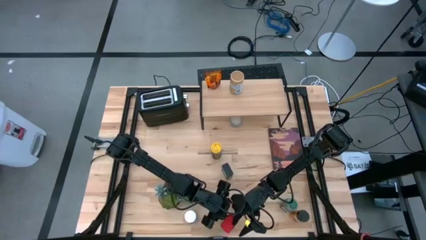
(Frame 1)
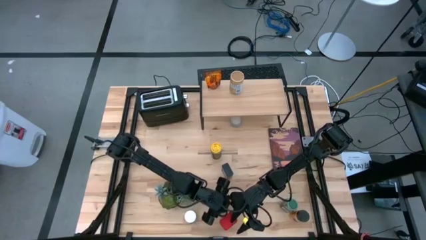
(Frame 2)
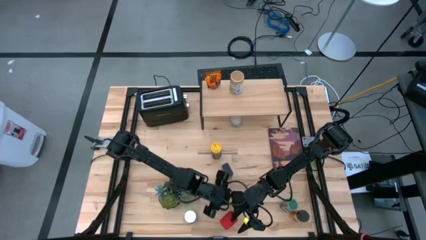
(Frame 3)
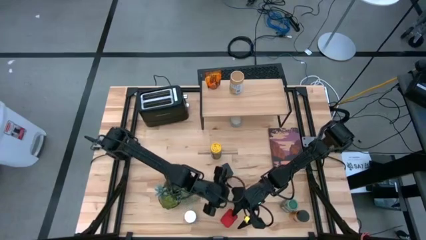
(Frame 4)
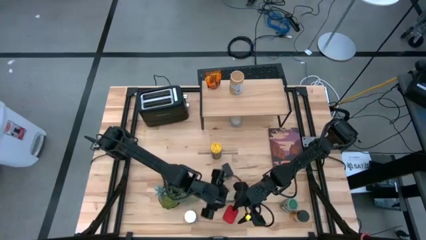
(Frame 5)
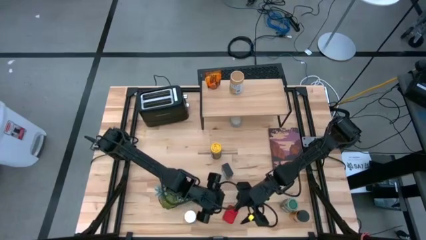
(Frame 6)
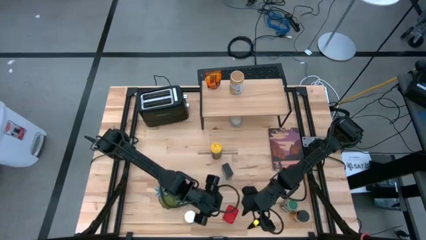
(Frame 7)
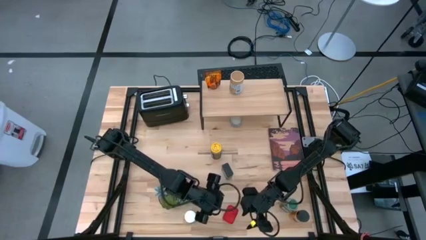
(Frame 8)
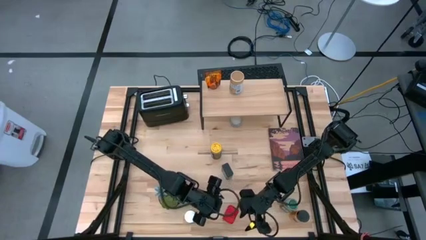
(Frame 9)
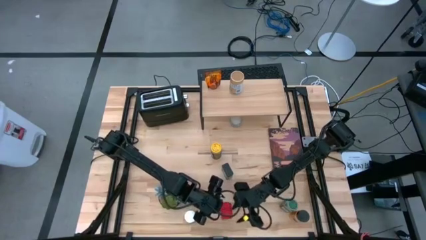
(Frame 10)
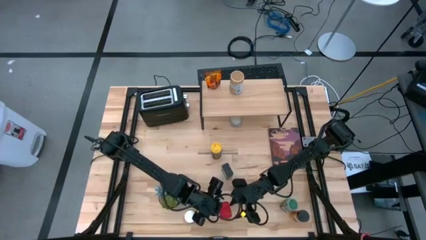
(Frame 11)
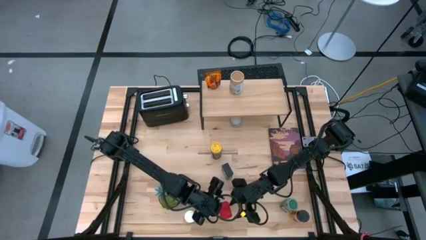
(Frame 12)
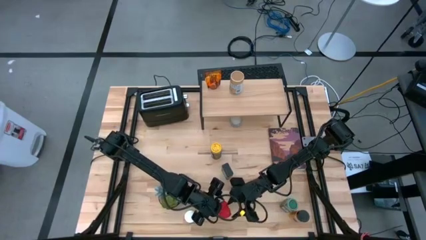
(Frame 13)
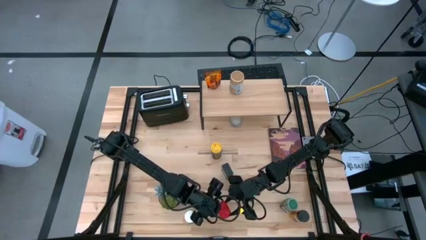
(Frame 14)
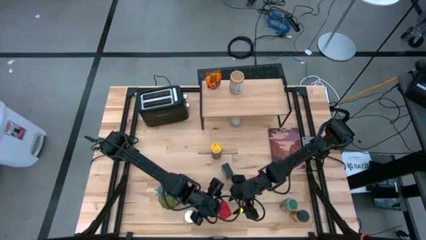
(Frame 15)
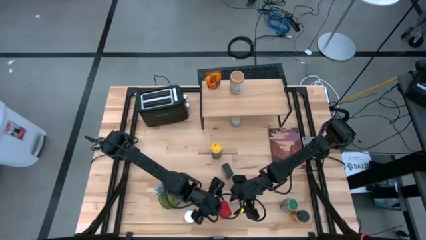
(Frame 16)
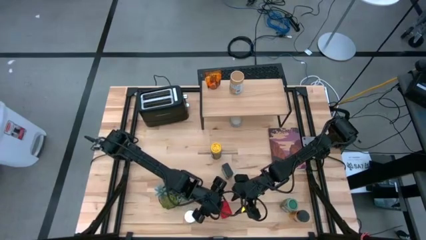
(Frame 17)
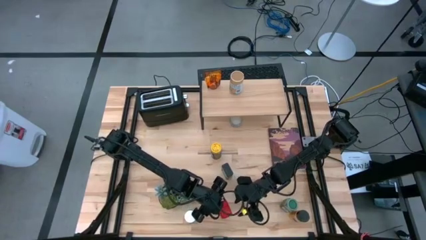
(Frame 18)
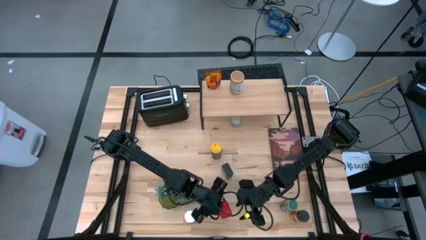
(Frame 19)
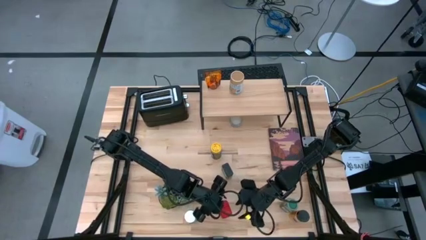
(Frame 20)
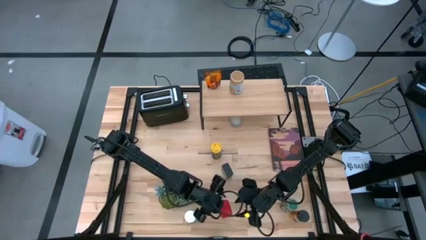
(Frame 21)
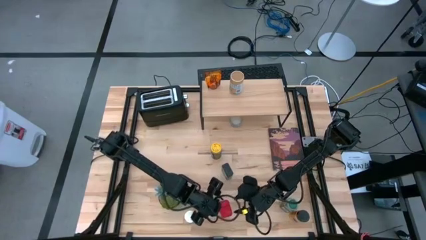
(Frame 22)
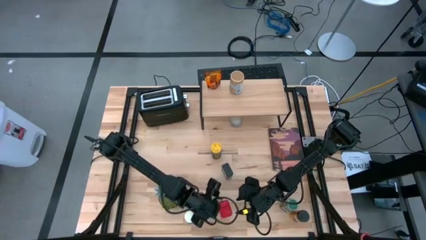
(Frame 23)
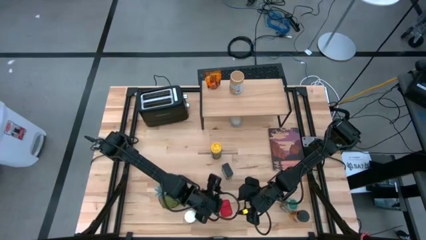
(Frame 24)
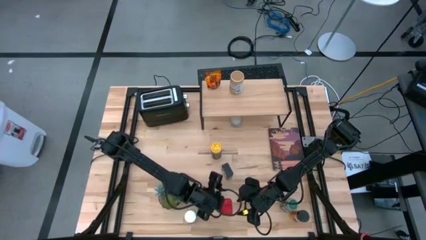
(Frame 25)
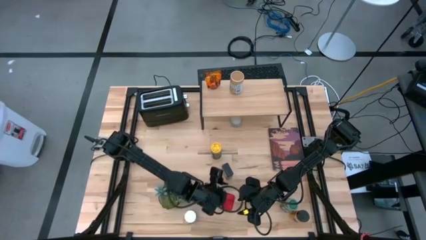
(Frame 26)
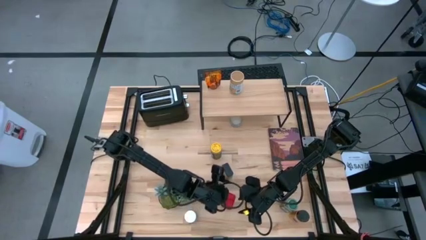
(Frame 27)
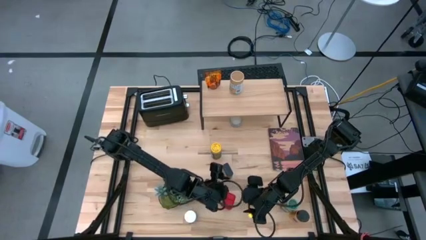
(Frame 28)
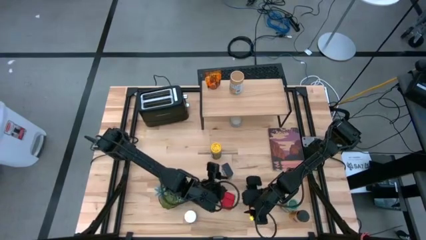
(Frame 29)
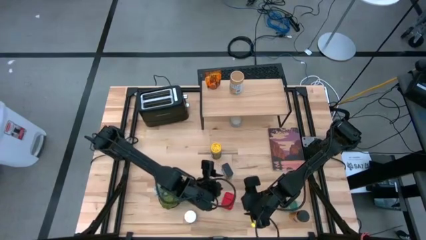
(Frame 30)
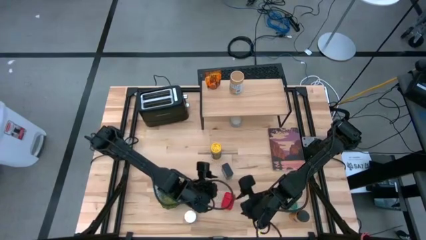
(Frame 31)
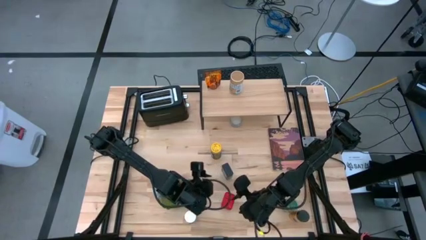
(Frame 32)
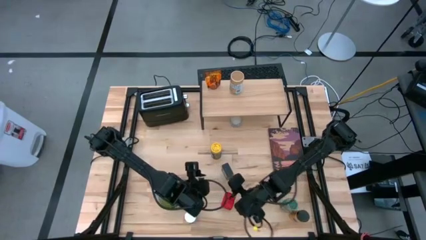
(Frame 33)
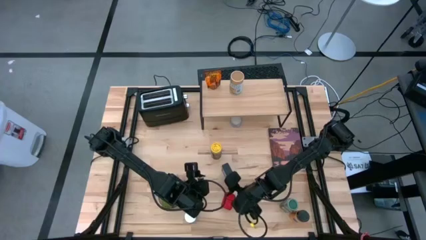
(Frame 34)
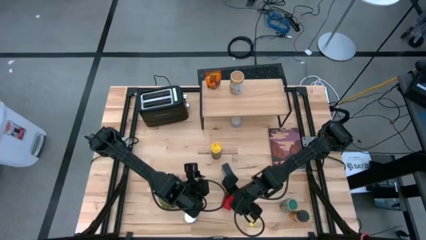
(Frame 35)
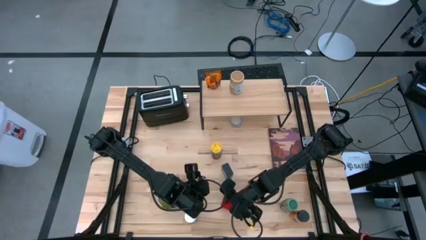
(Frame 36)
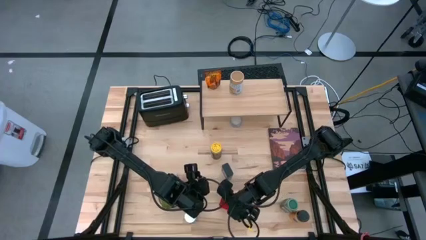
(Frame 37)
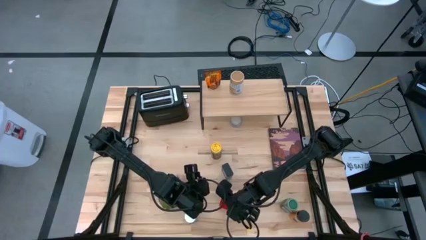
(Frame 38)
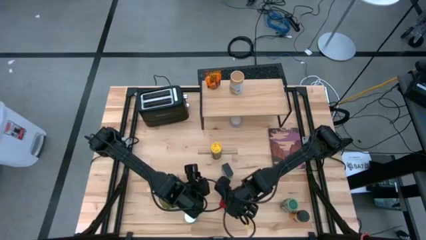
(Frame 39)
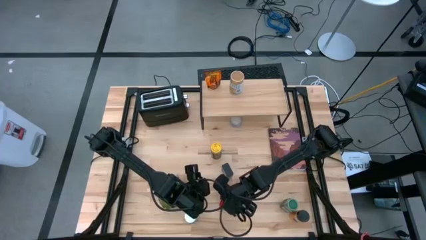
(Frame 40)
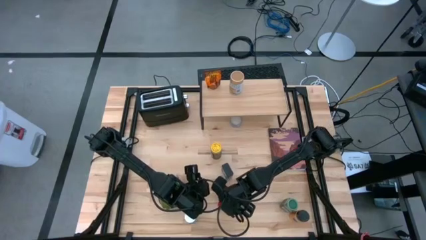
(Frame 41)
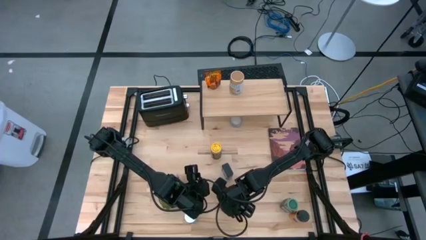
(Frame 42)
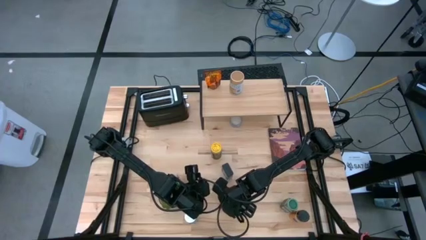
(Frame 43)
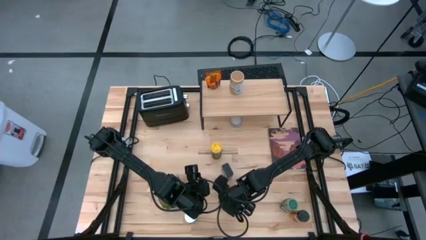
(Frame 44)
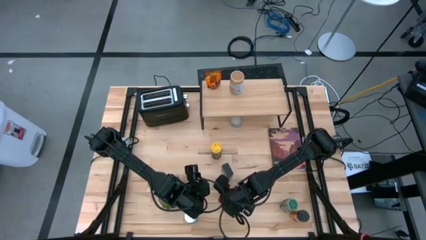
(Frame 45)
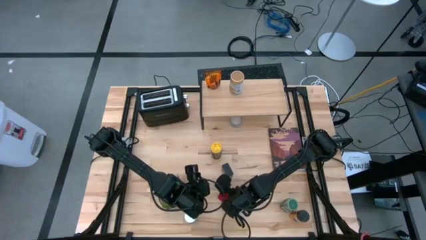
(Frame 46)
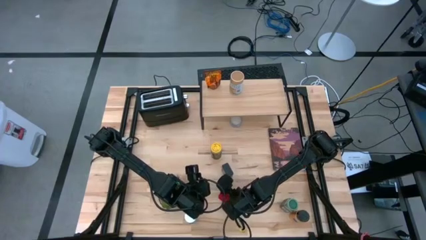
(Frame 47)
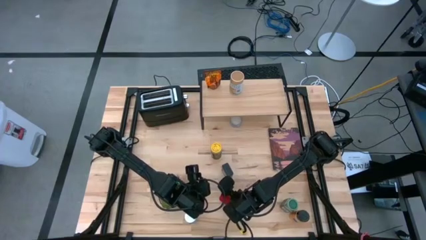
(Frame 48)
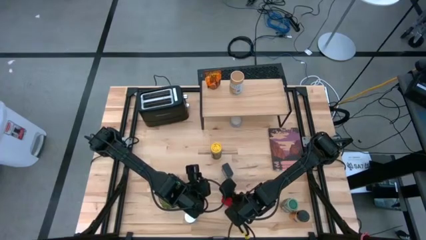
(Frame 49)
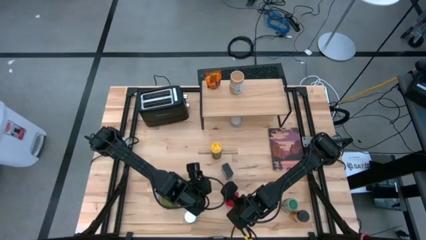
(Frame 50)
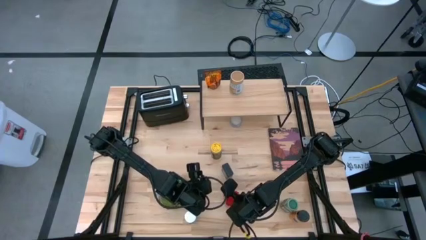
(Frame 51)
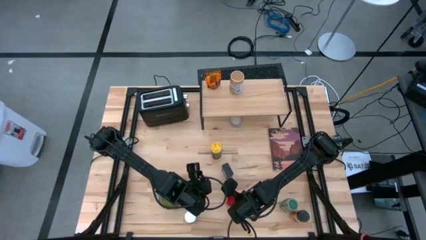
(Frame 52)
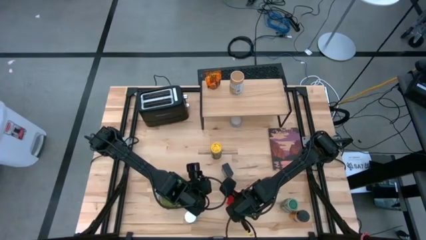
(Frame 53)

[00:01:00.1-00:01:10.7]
Task: Shelf spices
Put the red seasoning can on the shelf

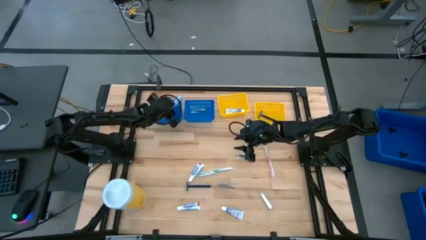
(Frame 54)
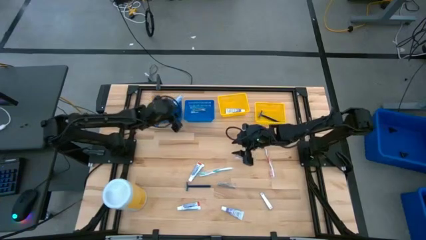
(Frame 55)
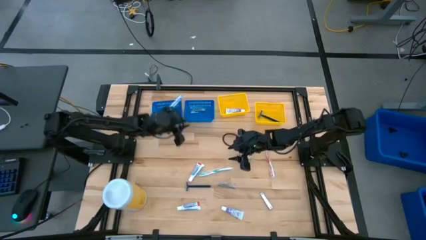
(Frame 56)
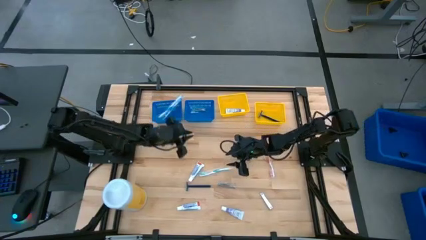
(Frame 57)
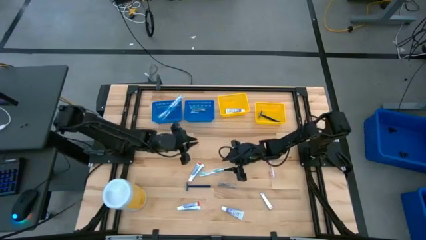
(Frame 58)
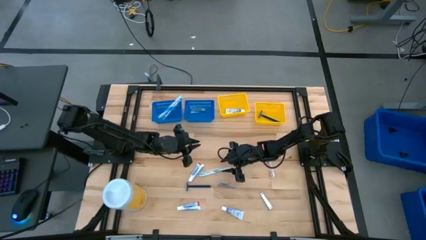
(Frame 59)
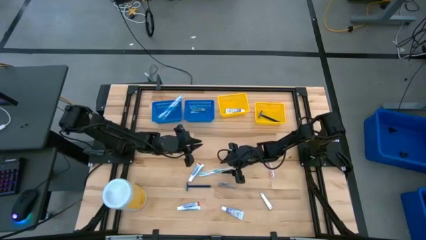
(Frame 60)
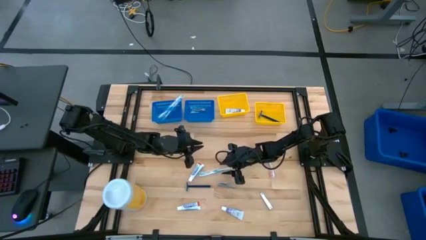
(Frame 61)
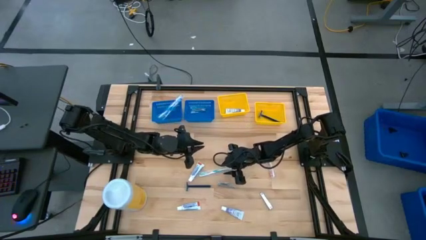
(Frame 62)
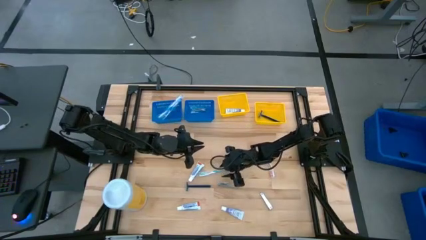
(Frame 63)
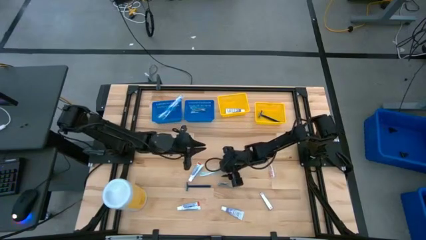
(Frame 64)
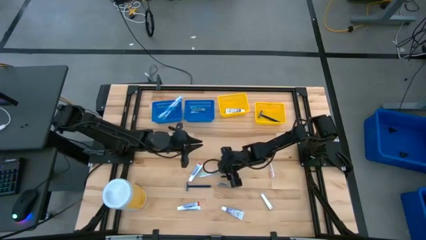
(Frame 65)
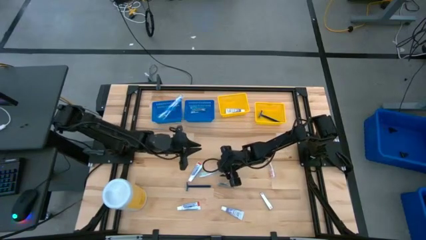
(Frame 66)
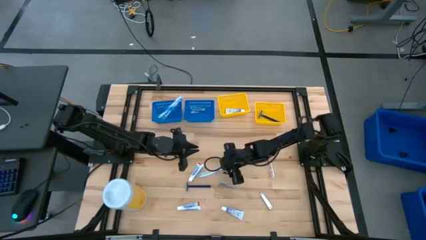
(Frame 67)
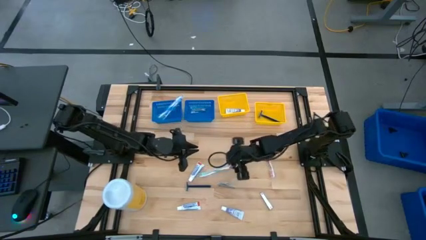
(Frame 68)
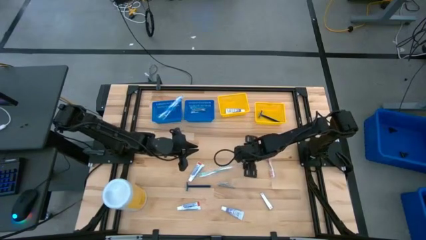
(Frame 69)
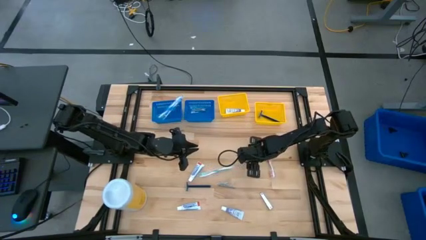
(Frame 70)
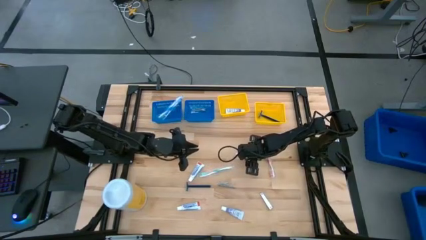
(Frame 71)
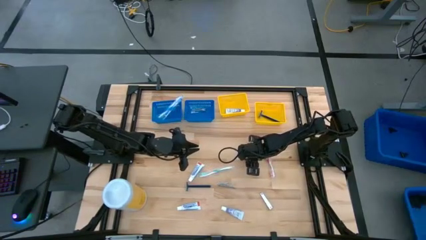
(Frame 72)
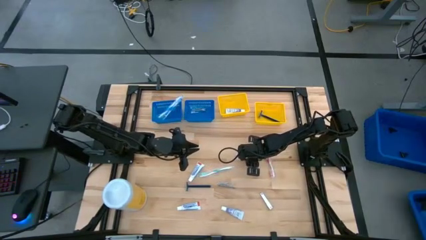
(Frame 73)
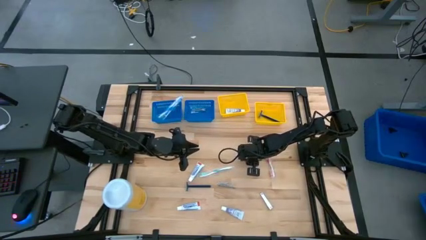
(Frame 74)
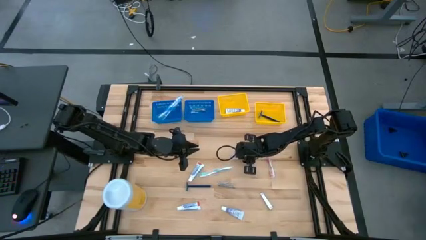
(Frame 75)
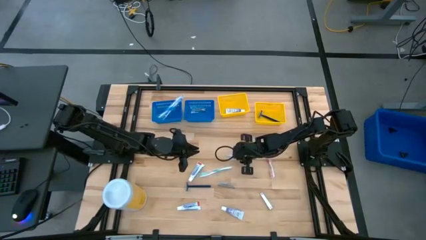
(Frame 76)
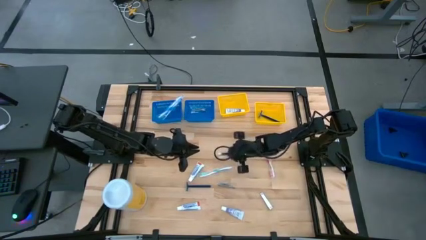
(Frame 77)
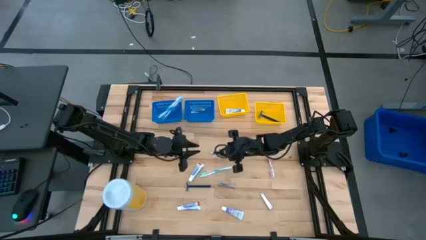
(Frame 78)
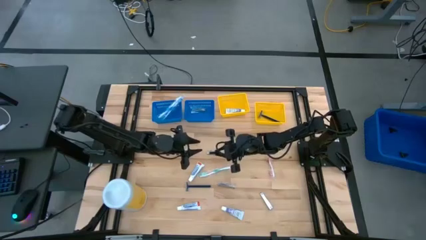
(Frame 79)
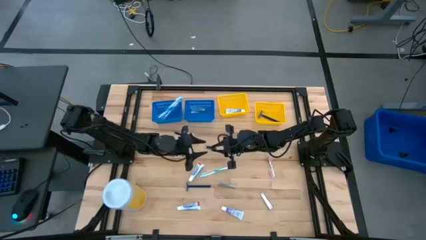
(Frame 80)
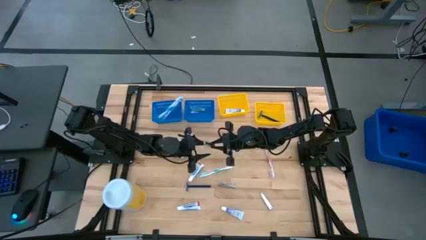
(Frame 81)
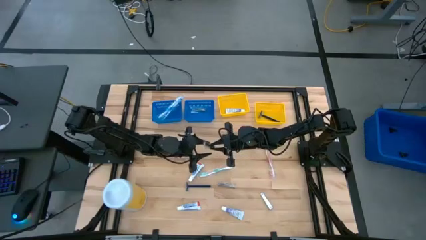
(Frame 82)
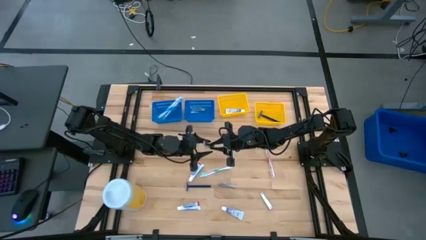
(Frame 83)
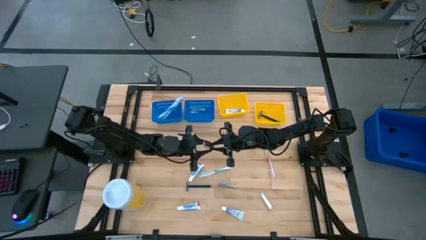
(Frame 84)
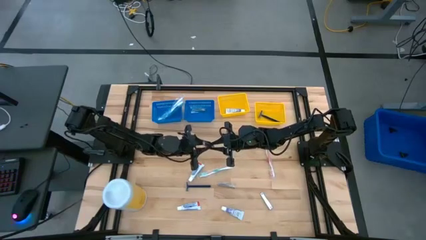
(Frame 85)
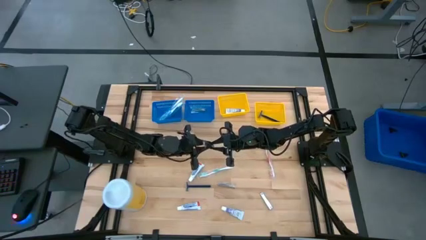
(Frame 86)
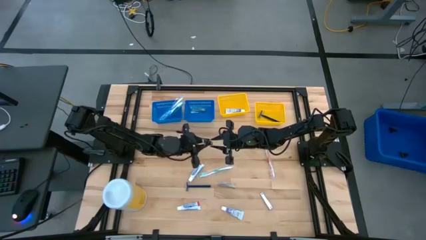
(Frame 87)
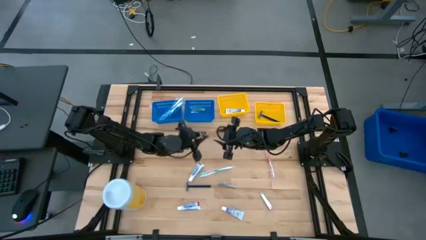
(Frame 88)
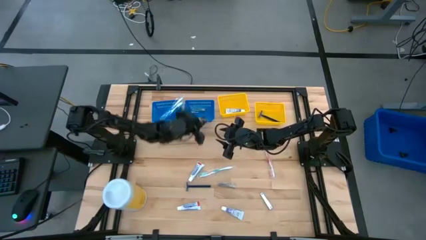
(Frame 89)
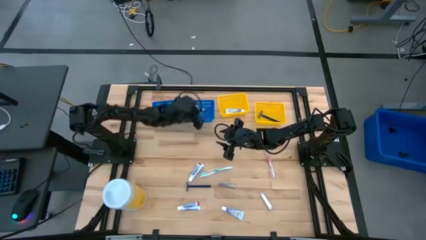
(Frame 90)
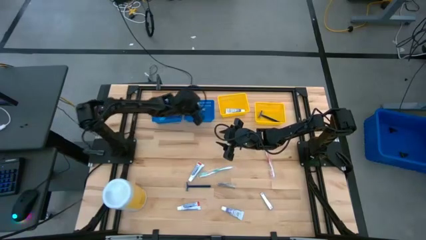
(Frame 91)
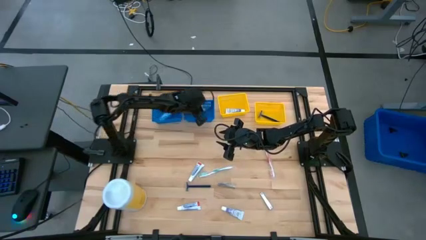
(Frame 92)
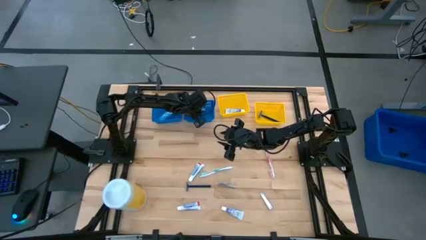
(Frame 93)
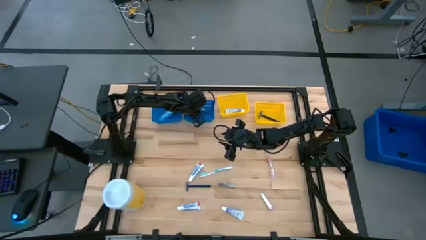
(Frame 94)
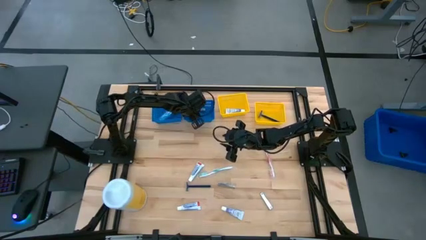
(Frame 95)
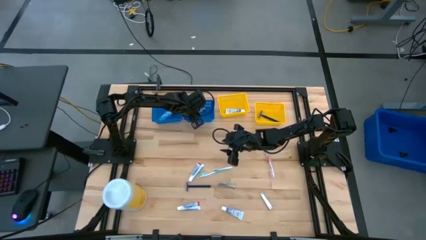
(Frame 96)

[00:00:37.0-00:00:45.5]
Task: Pick & Place Travel size toiletries
Put the silver nail cutter into the right blue bin
